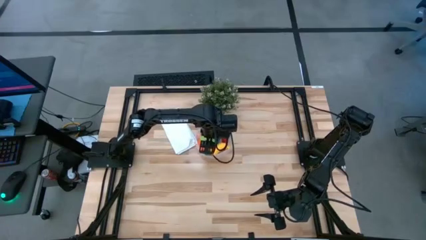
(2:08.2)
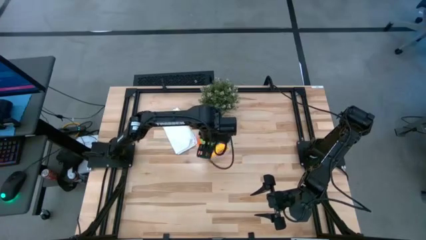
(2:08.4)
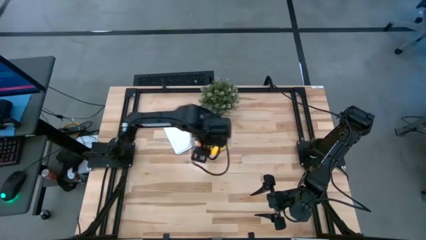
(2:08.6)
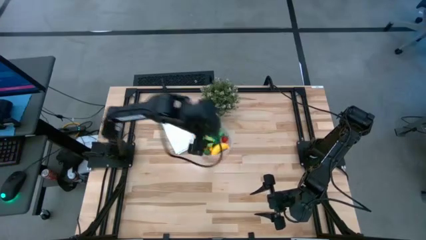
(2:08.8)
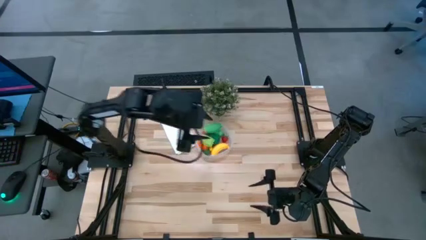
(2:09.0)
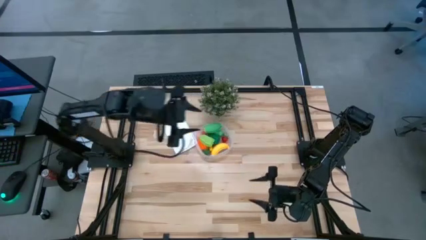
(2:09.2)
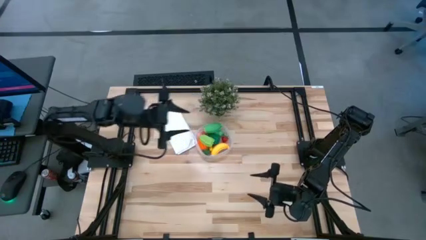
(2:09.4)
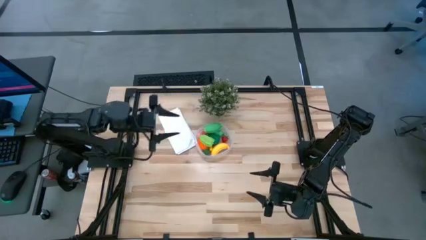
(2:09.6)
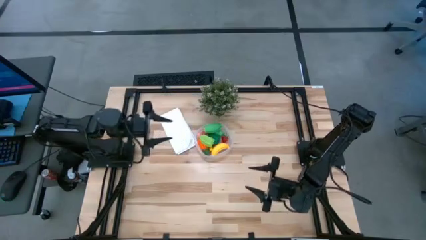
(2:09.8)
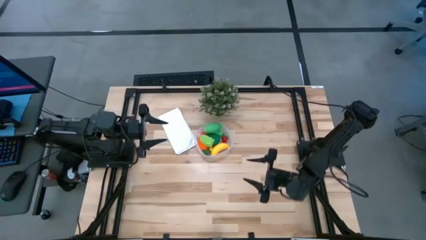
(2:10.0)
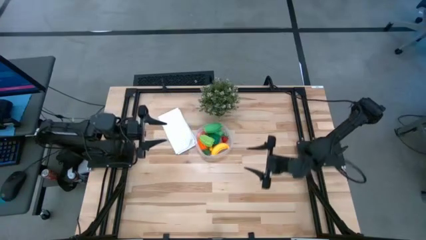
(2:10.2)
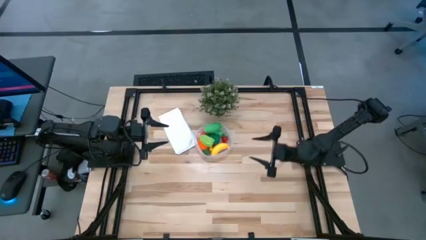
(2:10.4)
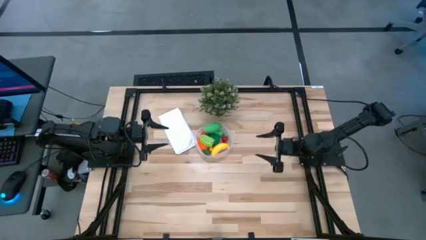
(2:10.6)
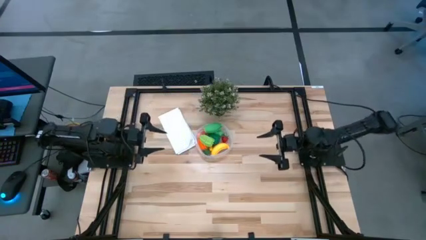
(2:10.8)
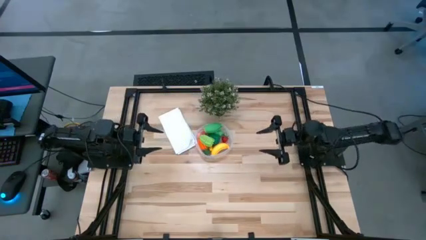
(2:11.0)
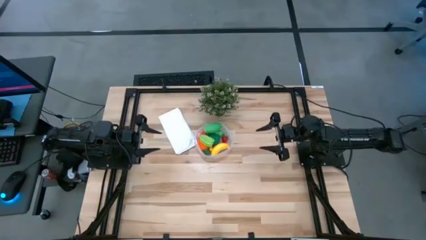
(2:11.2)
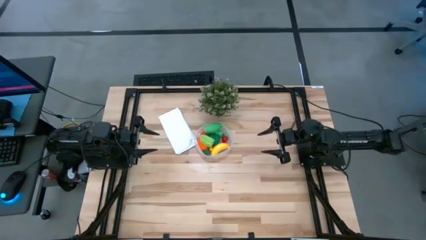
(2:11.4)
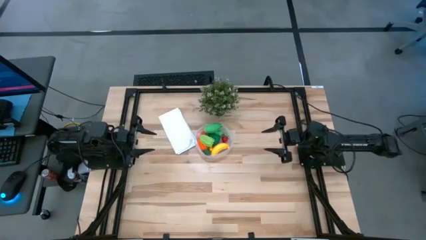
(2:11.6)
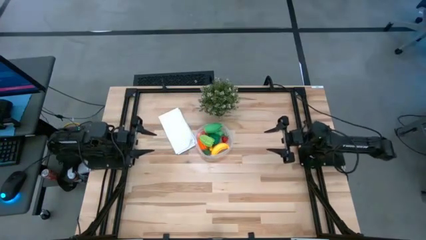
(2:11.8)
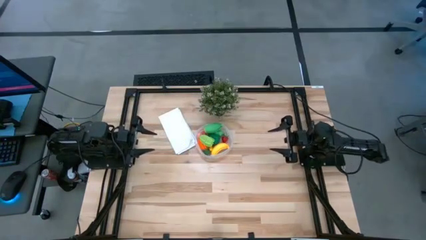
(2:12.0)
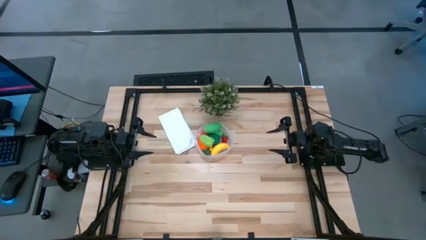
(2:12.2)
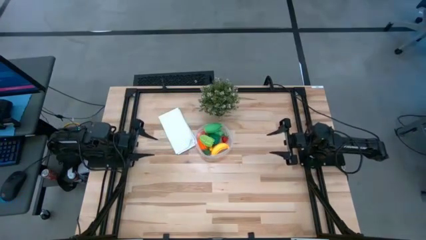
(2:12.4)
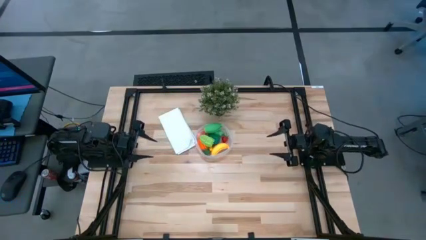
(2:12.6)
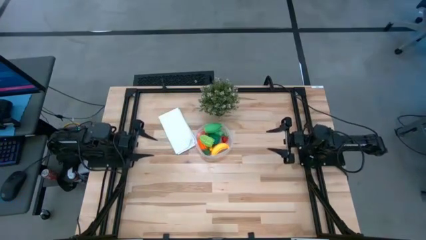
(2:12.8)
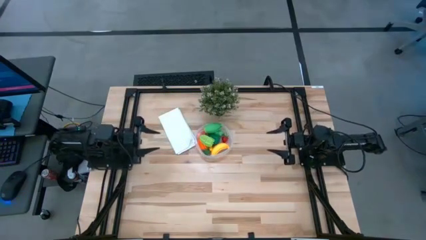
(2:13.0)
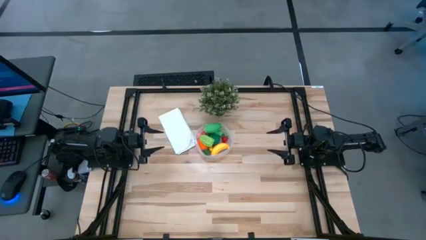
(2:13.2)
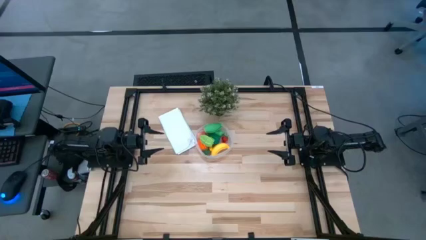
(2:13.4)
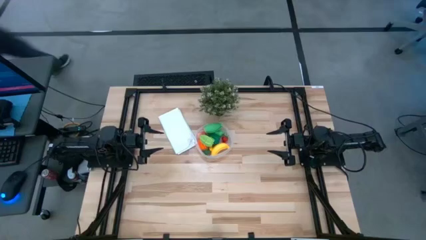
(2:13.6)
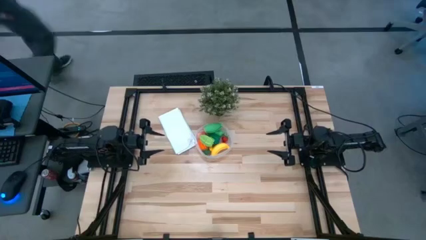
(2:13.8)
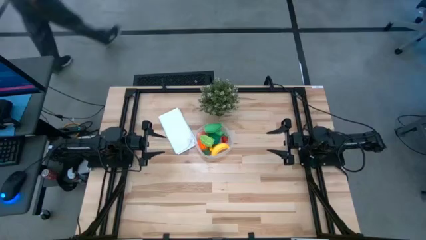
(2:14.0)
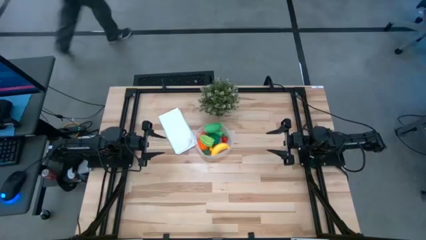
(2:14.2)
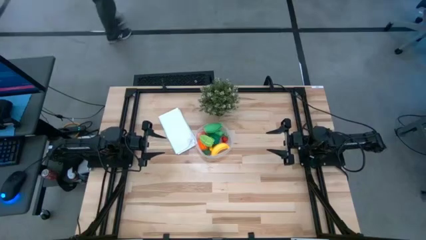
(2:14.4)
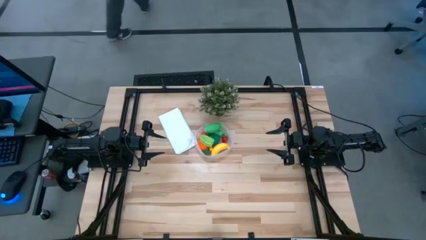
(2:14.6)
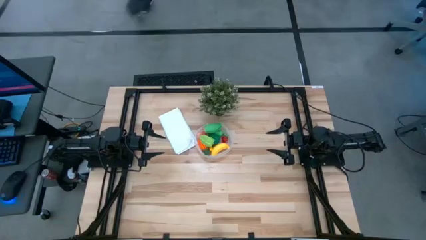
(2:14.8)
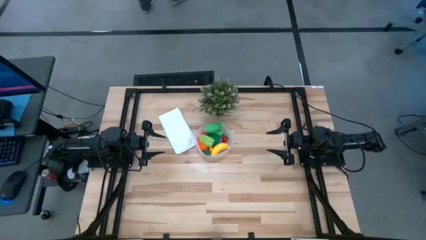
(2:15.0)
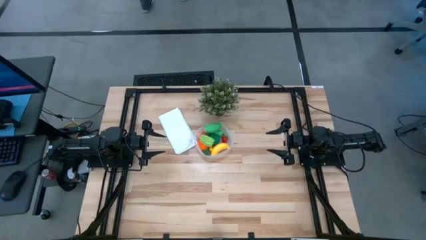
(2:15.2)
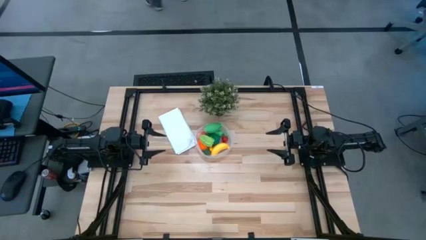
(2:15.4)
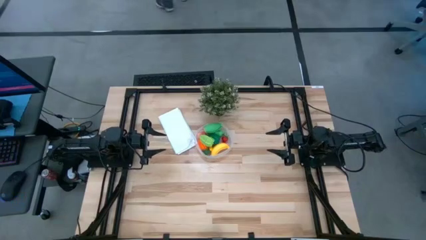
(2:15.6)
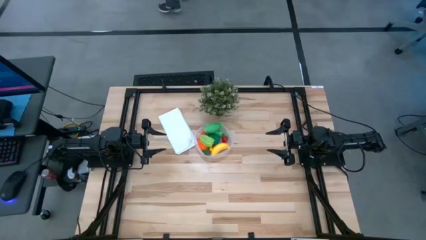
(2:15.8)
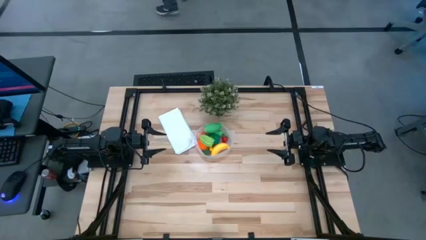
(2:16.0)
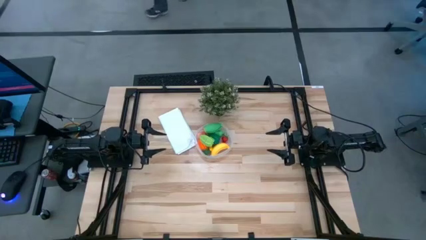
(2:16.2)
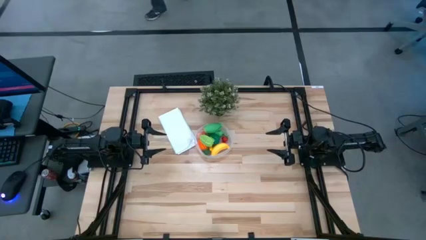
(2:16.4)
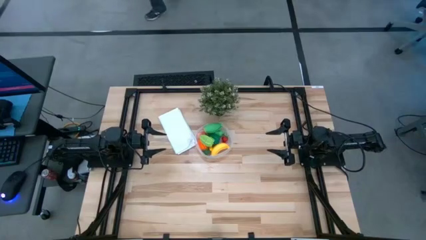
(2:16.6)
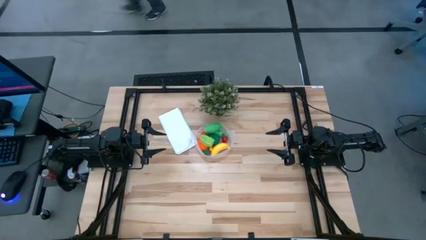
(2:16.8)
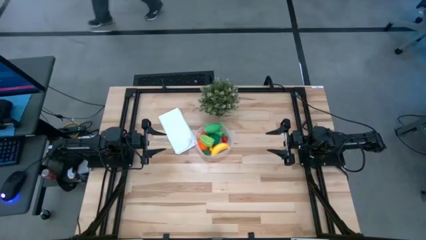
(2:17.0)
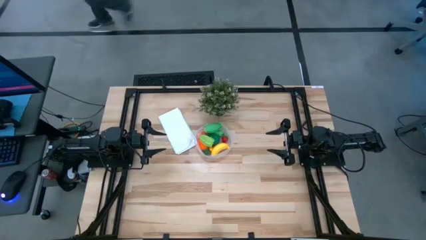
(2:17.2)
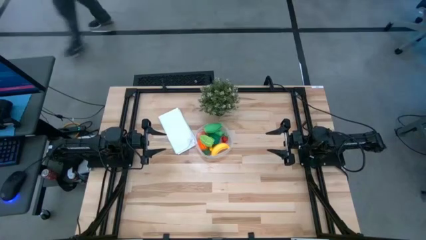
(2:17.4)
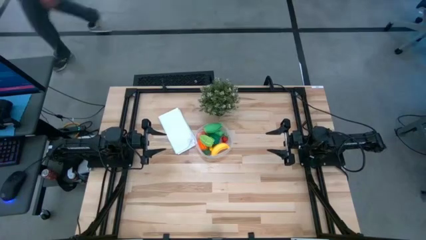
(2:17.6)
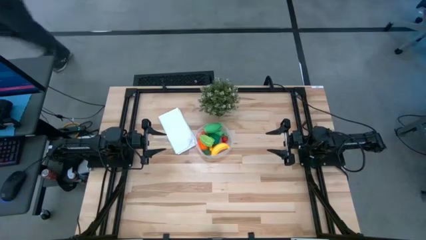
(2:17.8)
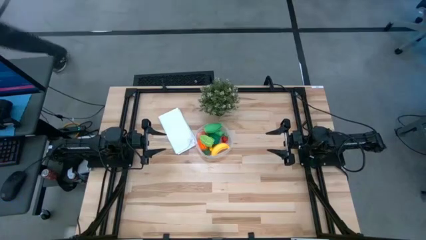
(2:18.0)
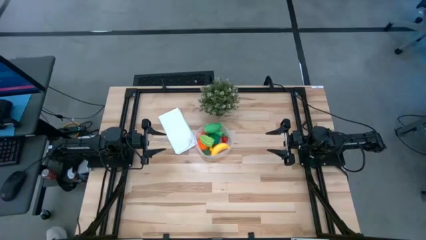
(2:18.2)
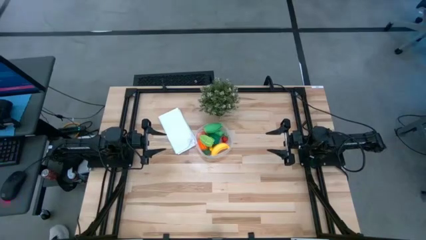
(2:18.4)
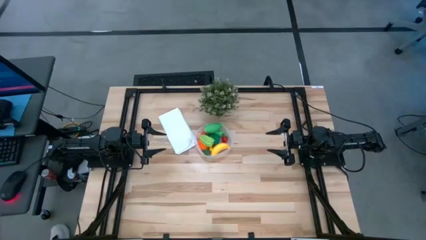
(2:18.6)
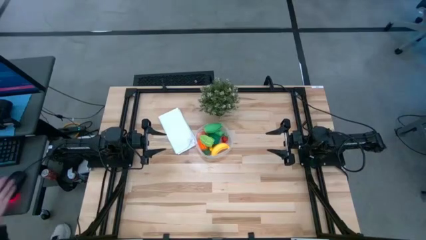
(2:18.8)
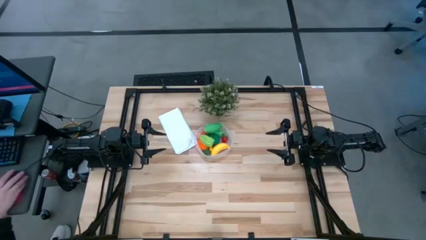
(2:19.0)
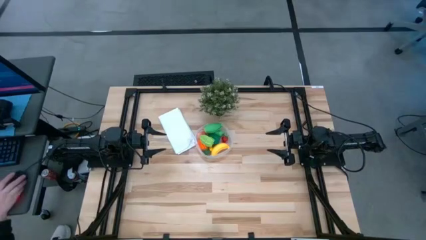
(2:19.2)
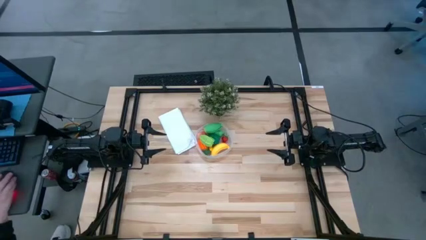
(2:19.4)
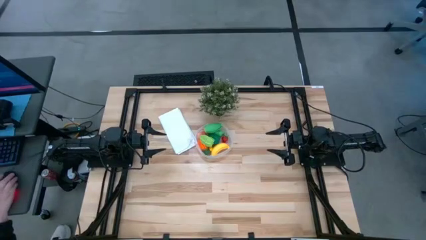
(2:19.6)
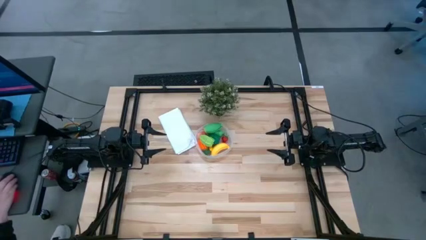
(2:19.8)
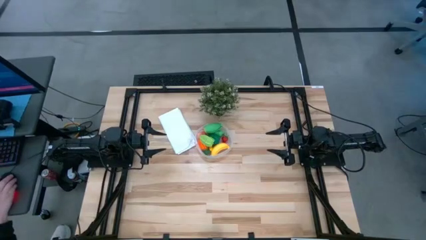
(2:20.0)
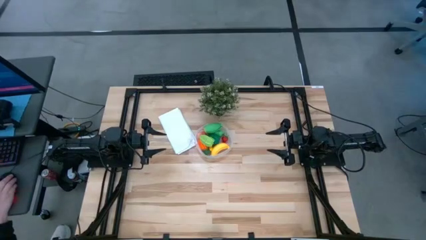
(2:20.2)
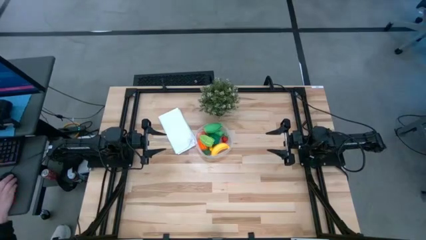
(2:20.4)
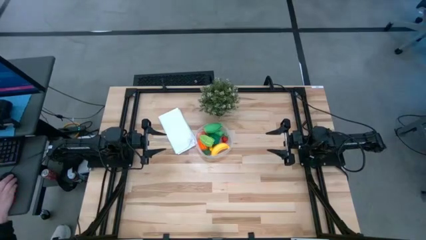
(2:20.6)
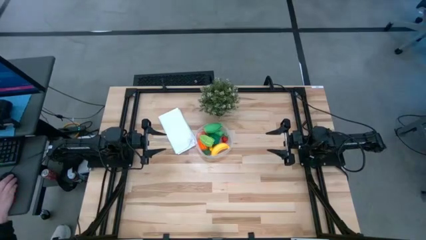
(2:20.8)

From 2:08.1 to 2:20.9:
Task: Pick and placing Produce into tupperware
Return to Home Position

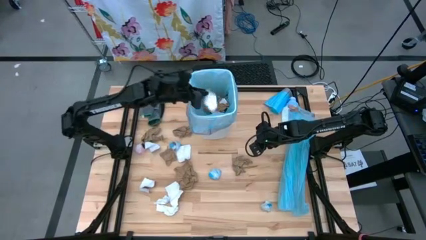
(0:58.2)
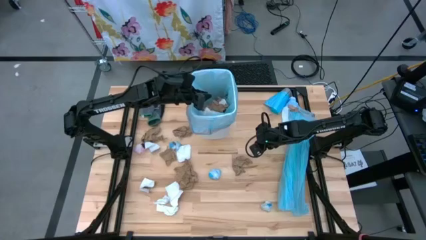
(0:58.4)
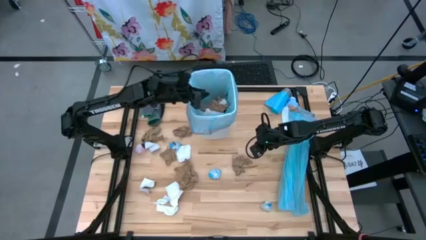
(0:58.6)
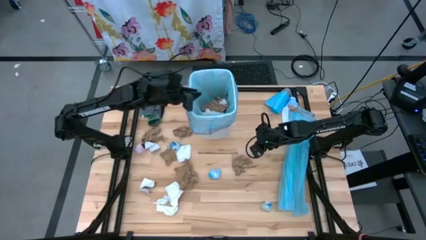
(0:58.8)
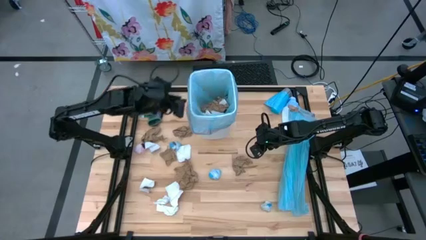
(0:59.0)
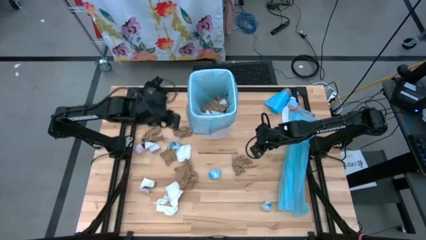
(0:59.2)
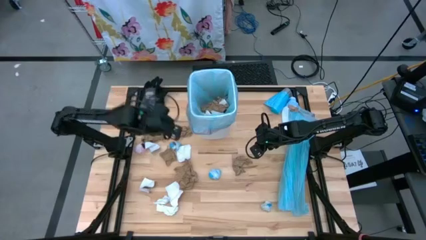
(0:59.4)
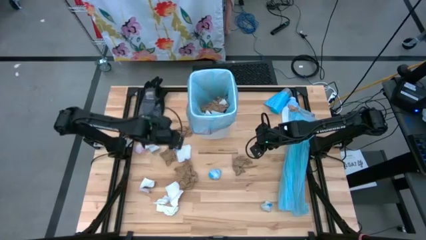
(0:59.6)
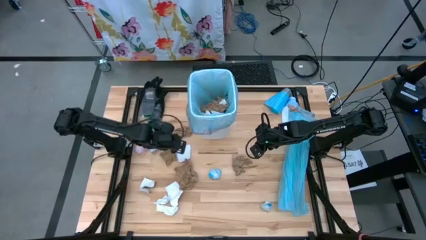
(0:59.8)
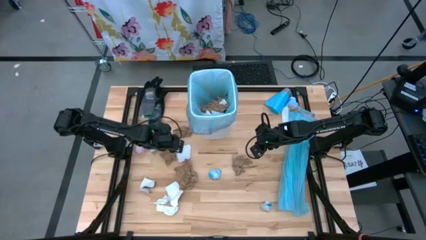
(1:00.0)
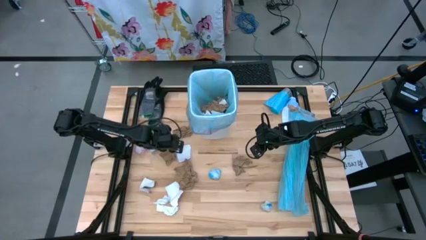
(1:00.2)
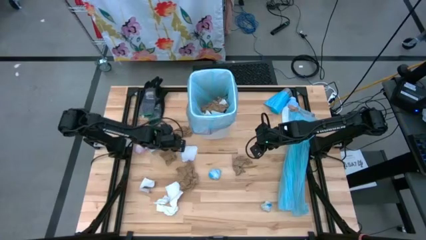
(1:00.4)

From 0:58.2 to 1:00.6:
Task: place trash/remove bag and relplace
Put the blue plastic into the trash bin

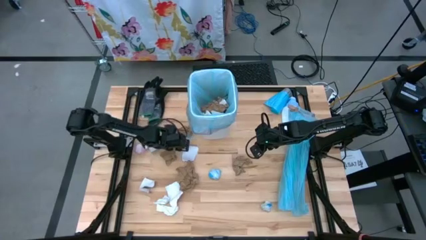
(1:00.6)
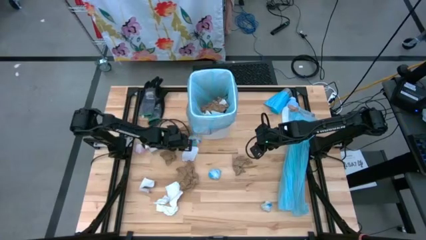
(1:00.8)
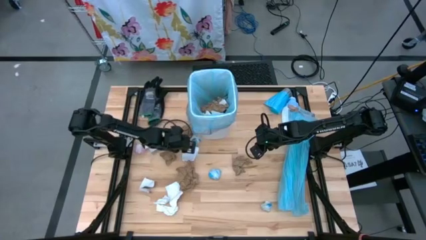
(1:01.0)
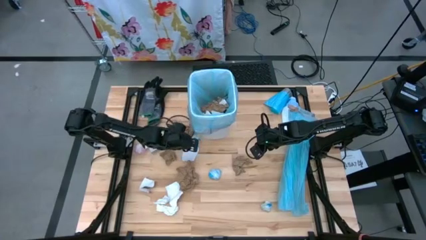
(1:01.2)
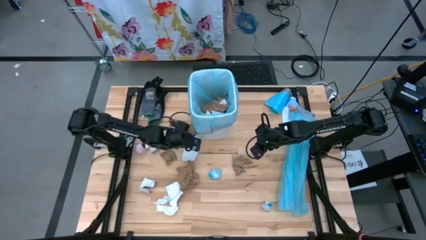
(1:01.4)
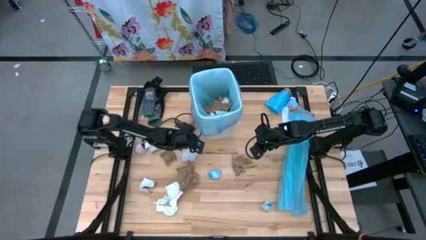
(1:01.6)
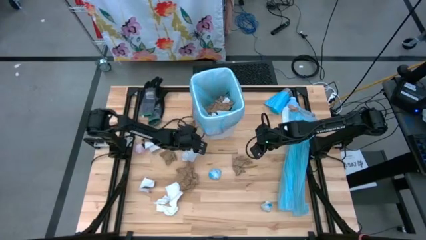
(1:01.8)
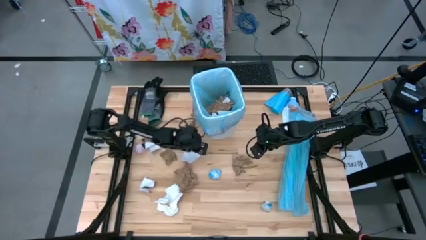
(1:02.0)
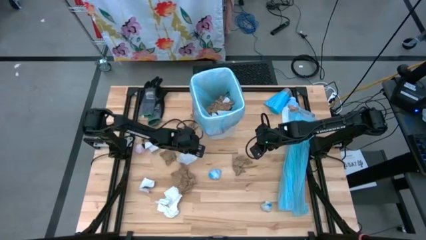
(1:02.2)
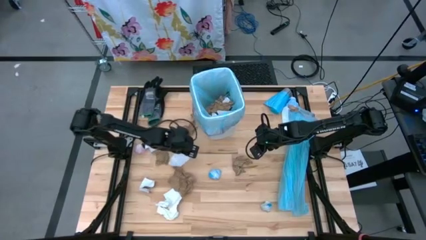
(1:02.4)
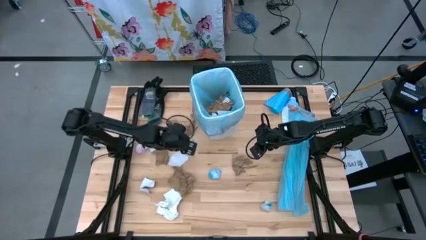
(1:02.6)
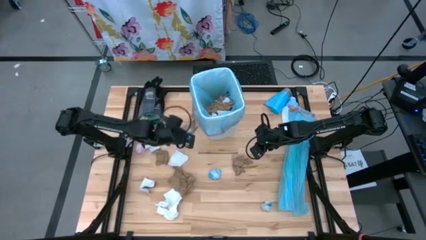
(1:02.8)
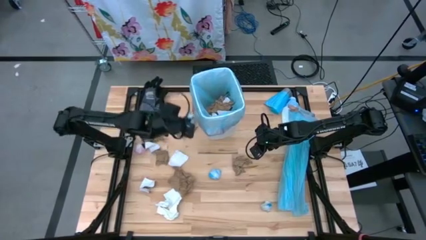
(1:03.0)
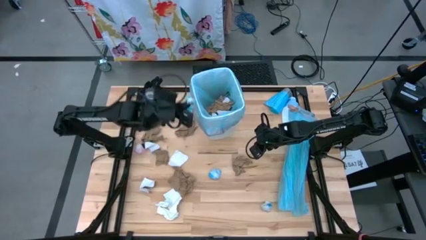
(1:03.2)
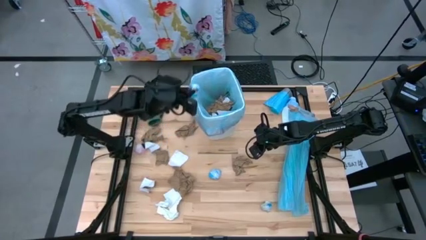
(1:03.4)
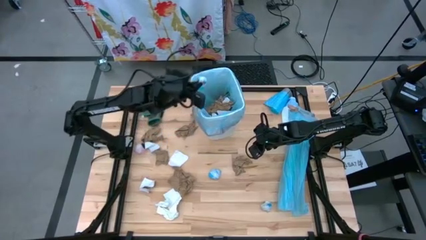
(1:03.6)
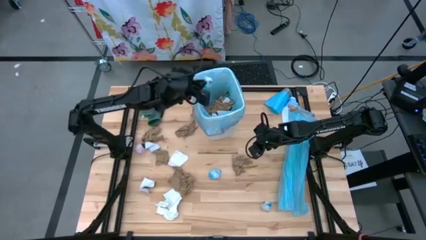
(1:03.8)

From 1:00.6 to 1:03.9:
Put the blue plastic into the trash bin
